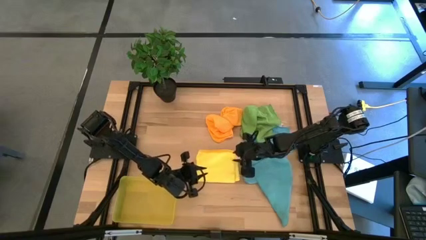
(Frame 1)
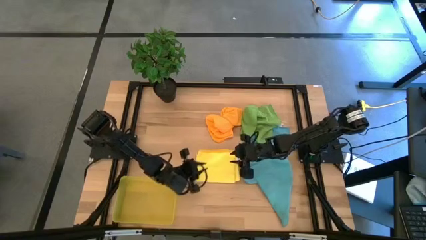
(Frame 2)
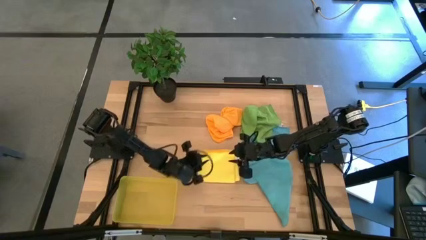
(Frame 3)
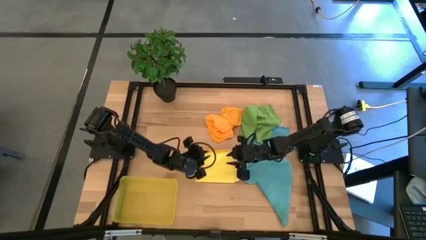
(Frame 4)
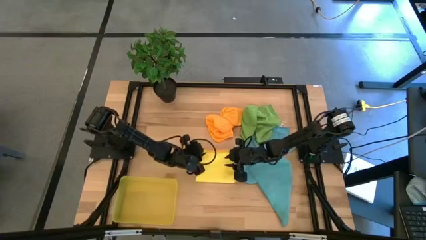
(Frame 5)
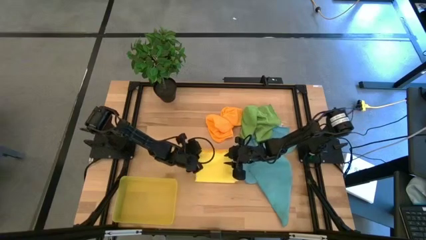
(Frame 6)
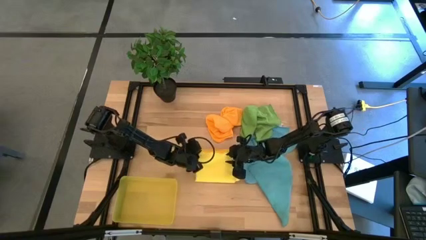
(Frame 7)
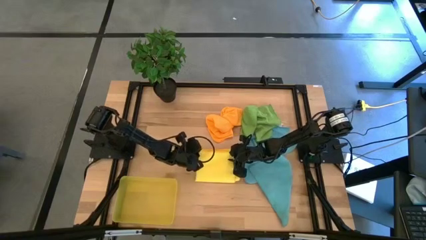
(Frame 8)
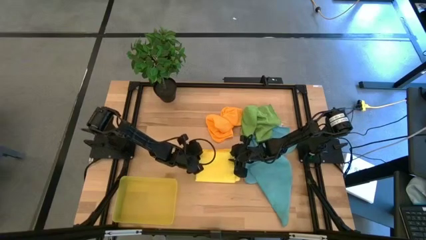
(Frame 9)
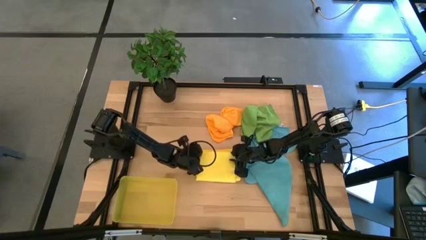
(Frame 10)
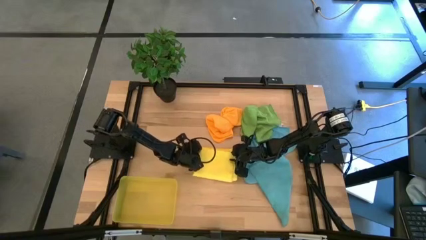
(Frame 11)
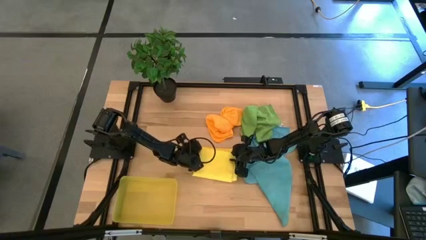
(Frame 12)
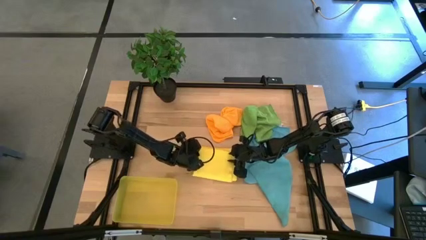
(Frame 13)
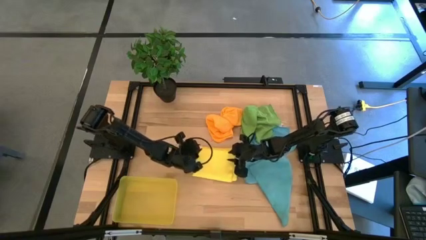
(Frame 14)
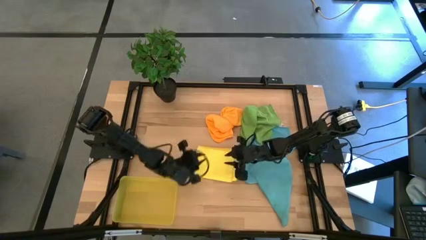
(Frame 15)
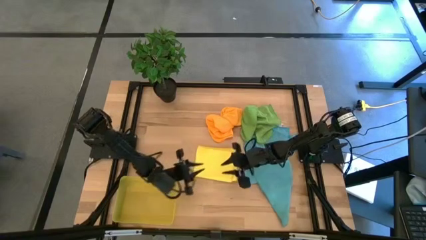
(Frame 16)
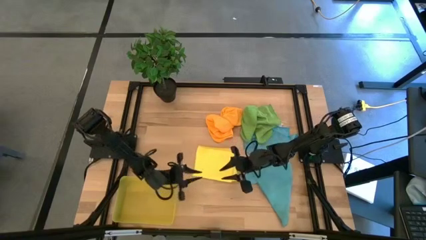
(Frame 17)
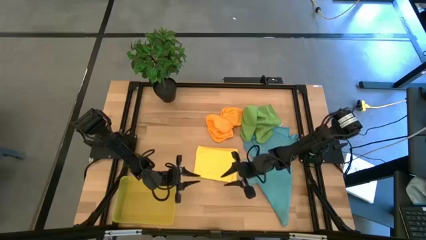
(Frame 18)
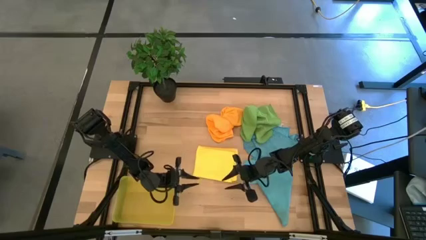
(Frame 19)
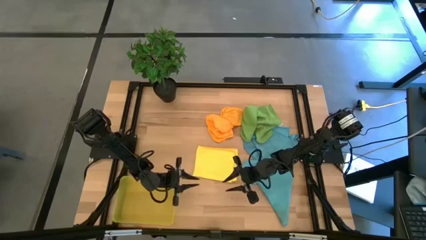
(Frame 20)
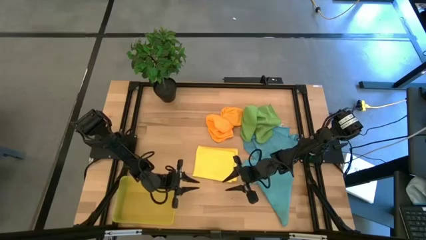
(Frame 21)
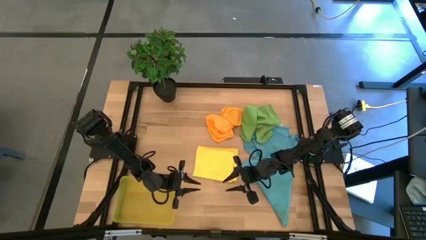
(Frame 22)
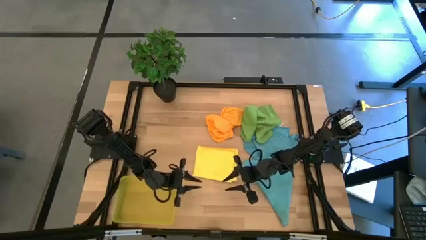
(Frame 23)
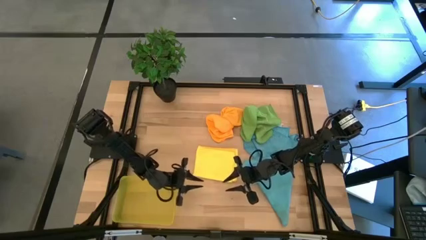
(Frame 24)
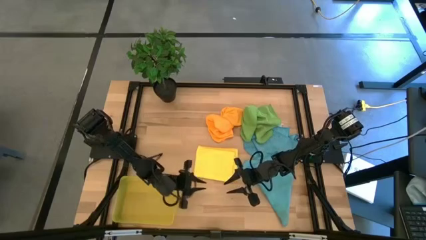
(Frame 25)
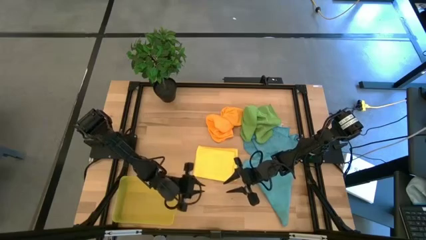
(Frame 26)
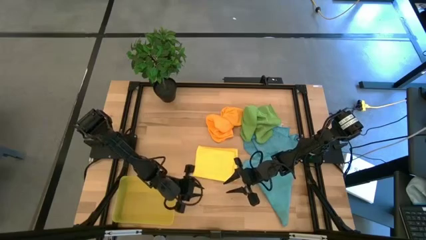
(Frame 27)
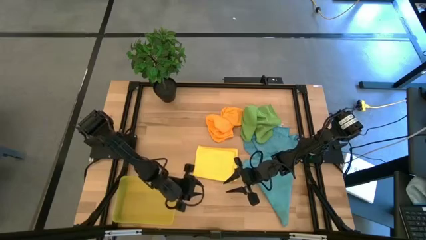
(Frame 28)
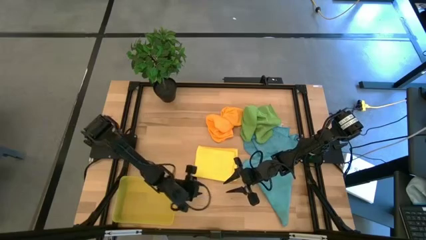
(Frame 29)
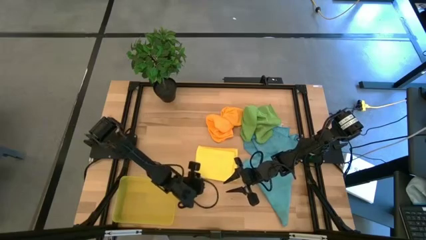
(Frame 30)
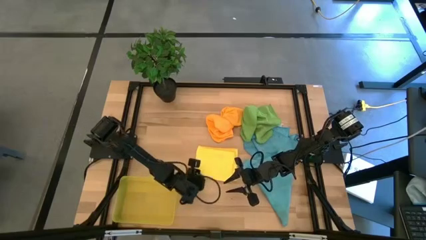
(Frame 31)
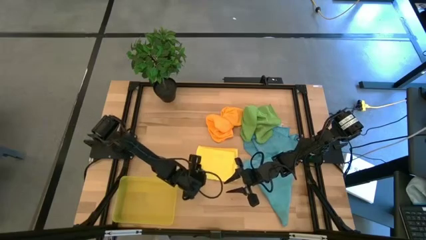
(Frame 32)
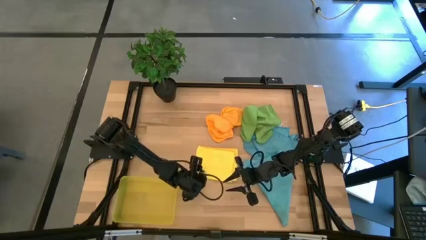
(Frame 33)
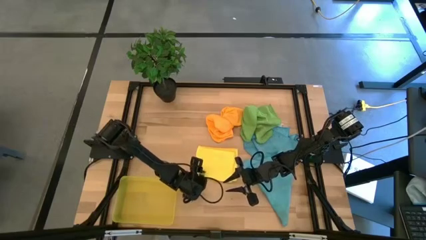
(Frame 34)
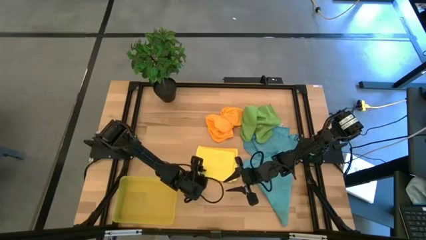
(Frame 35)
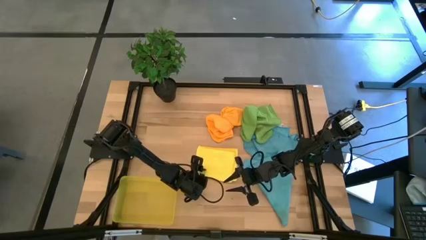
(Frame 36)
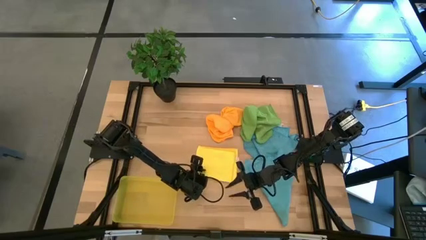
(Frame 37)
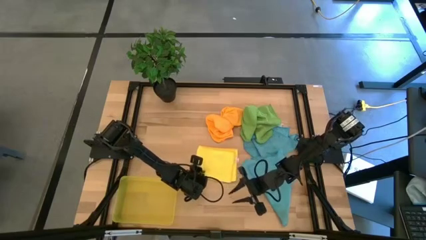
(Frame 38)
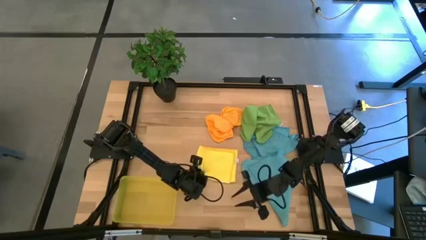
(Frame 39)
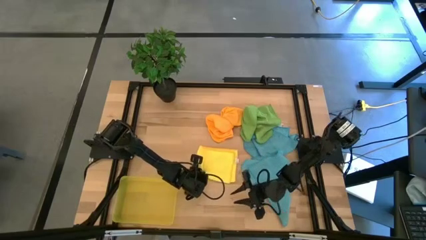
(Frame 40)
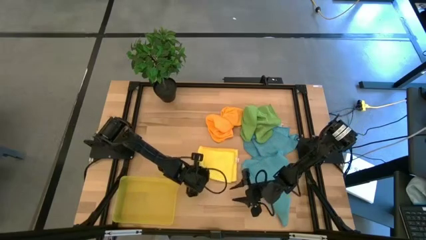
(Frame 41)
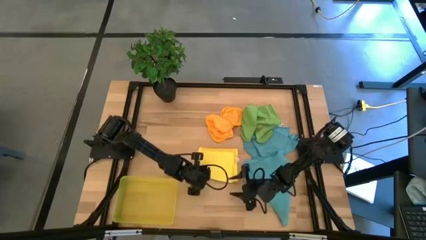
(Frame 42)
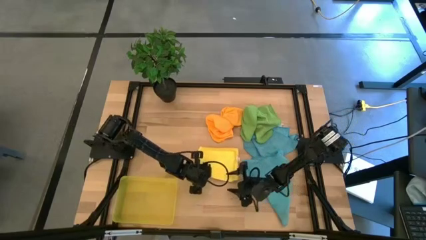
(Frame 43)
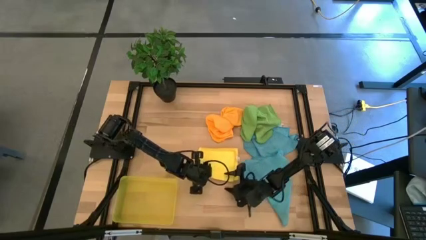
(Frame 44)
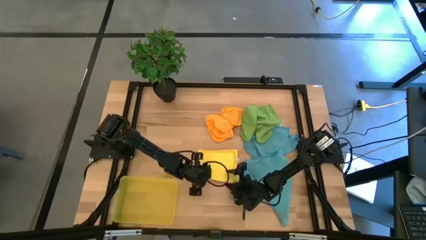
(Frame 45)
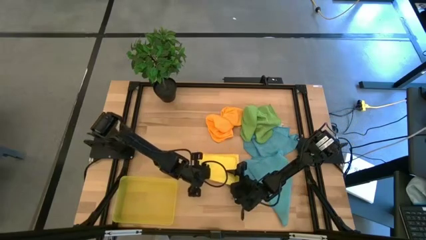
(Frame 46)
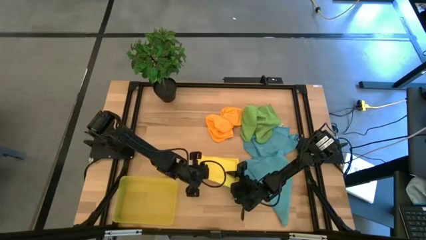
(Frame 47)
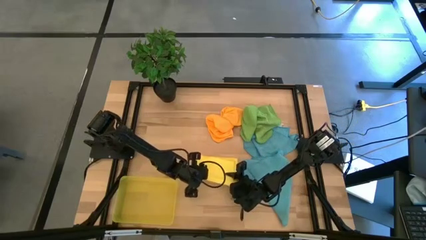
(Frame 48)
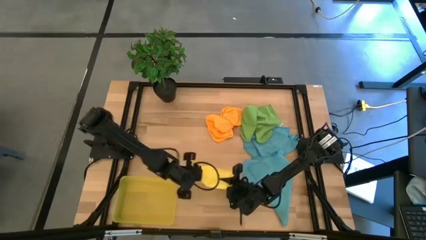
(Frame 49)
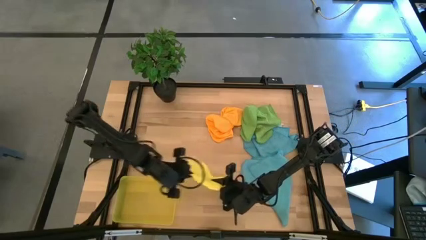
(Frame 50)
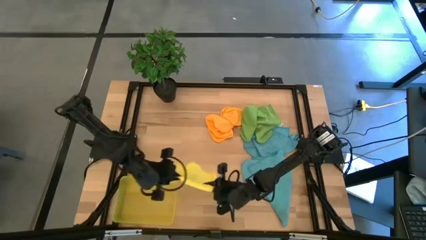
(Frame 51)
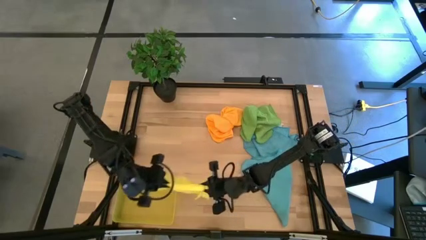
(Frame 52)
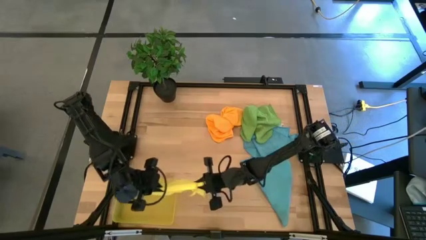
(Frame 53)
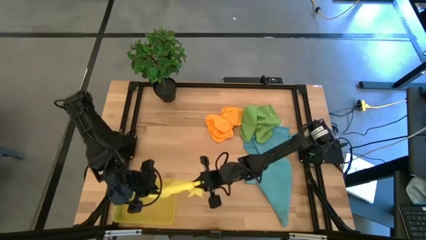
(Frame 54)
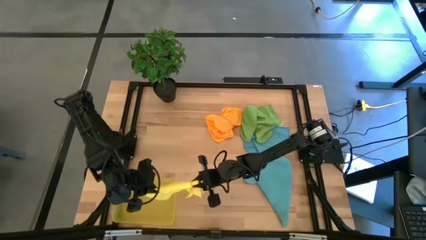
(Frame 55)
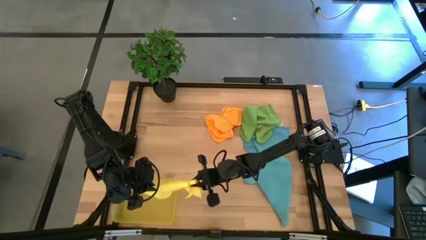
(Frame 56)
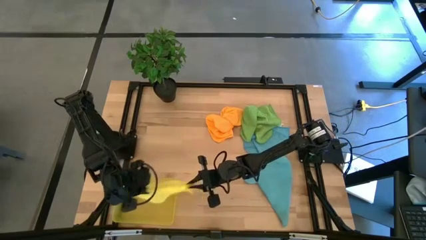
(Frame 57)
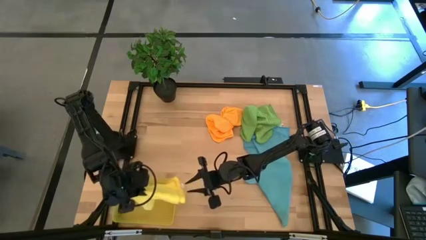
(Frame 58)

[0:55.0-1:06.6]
Task: Fold microfiber towels
Put the folded yellow microfiber cloth into the yellow bin
